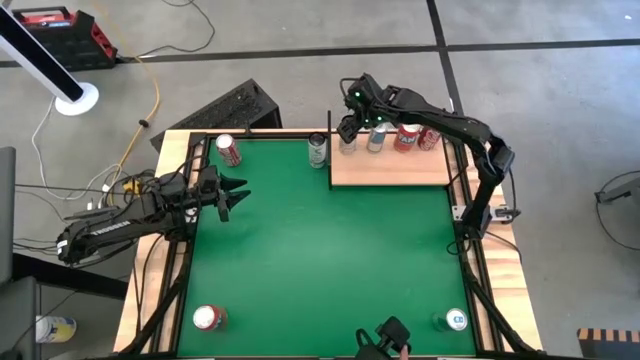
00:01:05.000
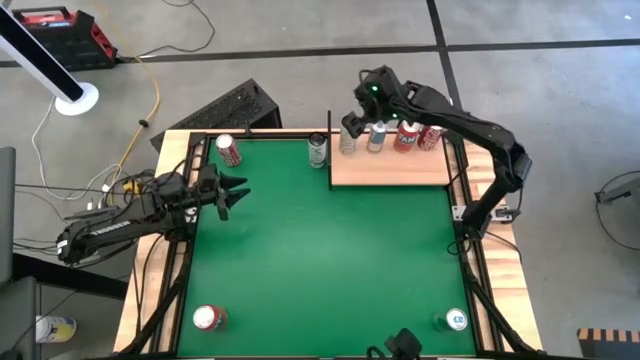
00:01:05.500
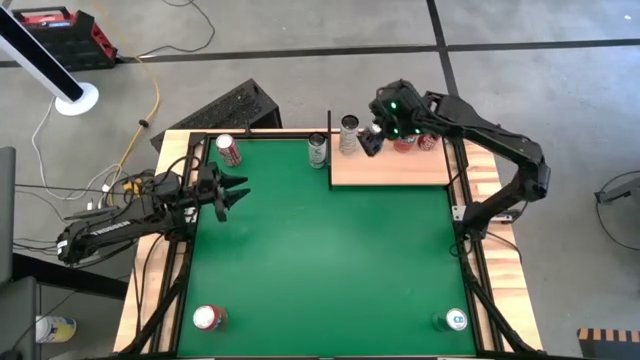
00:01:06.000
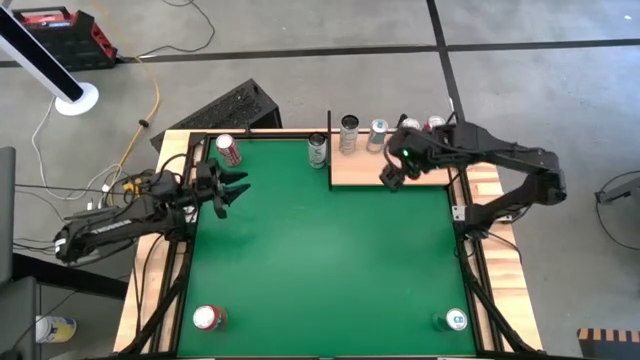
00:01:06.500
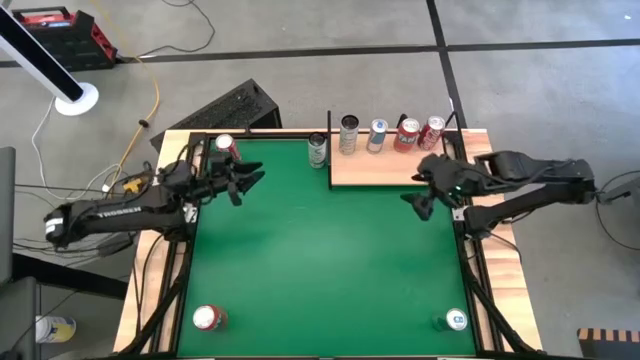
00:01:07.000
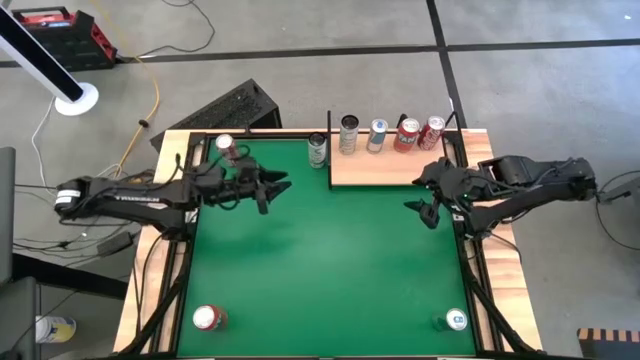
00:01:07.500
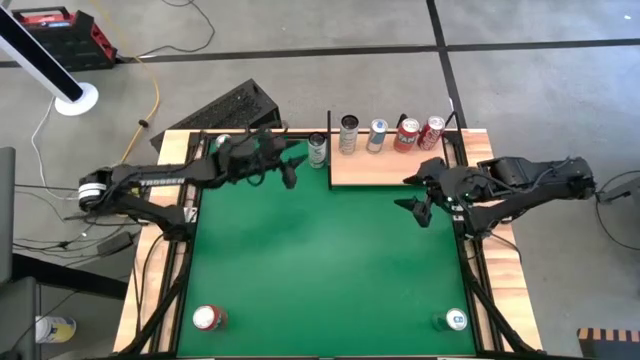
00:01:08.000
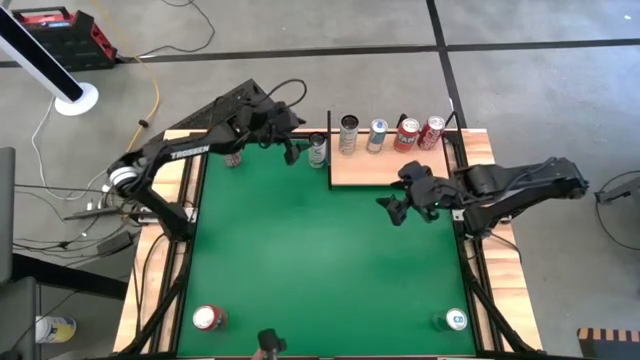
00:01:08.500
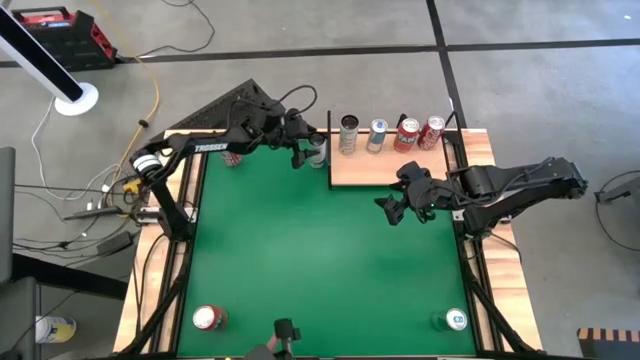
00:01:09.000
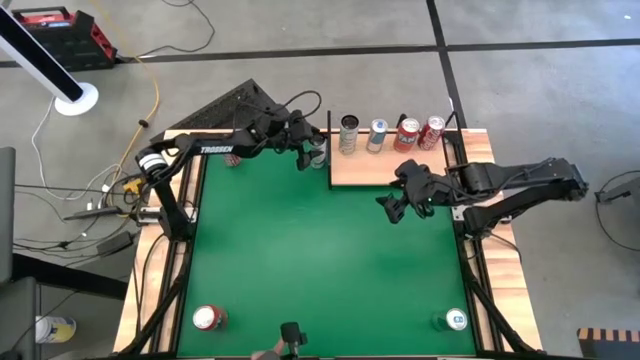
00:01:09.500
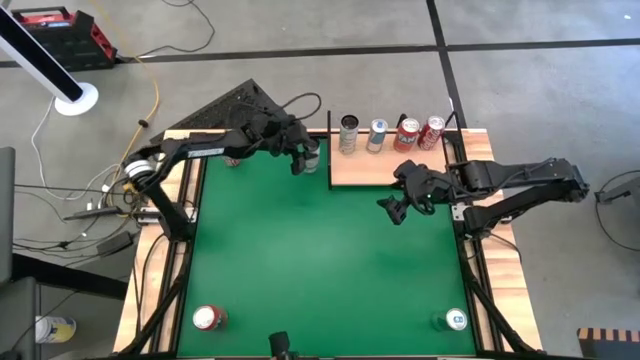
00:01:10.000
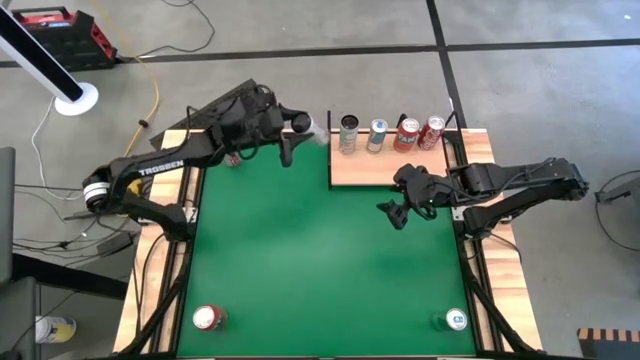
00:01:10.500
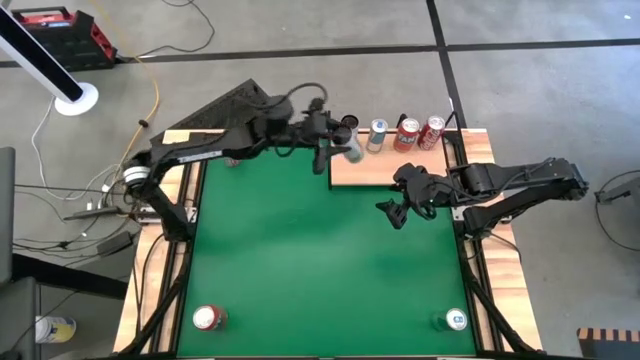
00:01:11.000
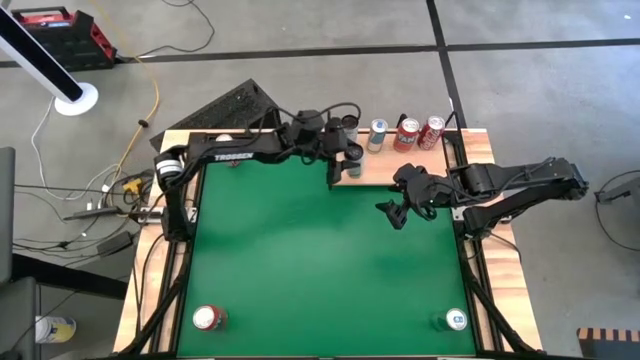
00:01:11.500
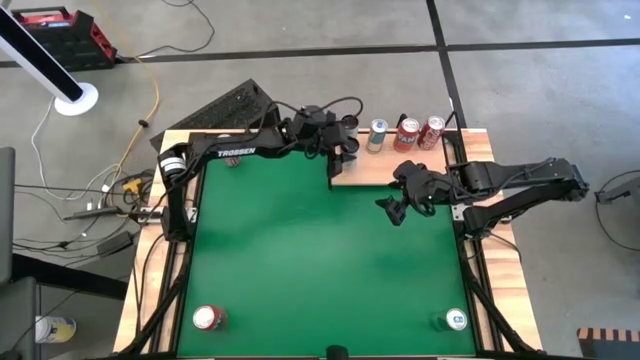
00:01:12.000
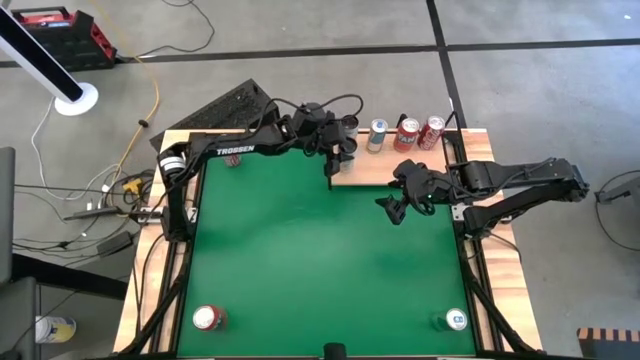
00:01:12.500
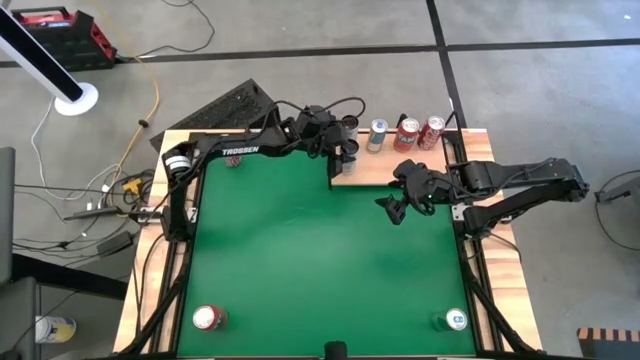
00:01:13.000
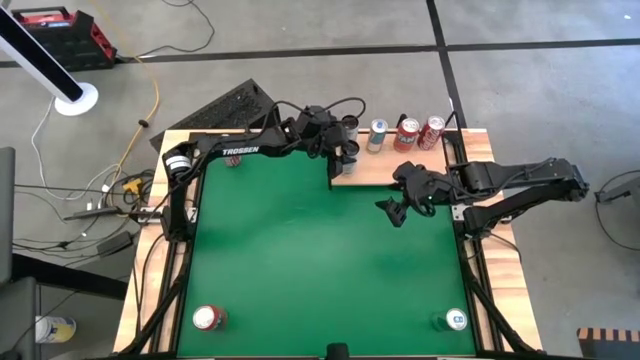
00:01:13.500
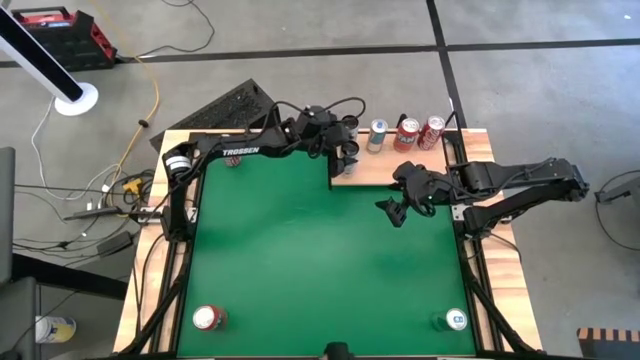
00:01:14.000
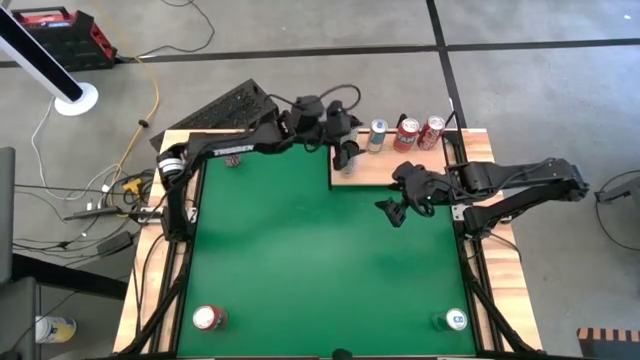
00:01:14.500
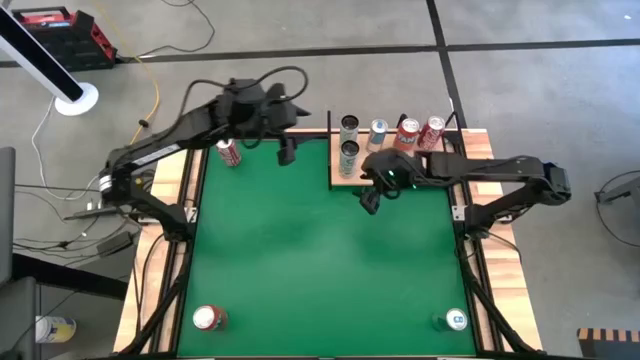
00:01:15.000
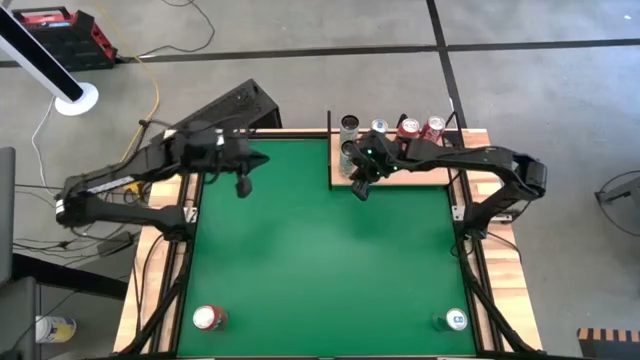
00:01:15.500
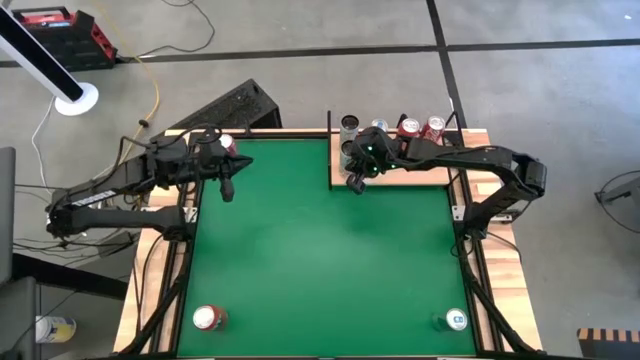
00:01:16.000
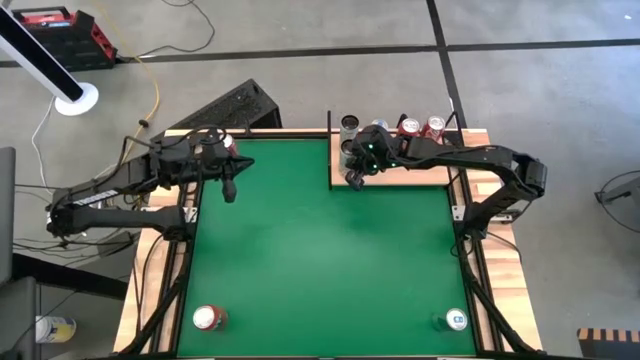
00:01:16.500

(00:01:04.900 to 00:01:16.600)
Task: Place canned beverage on shelf
Put the white yellow soda can on the shelf aligned with the other white yellow soda can

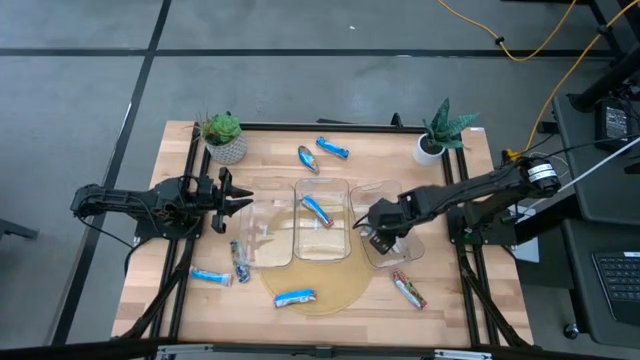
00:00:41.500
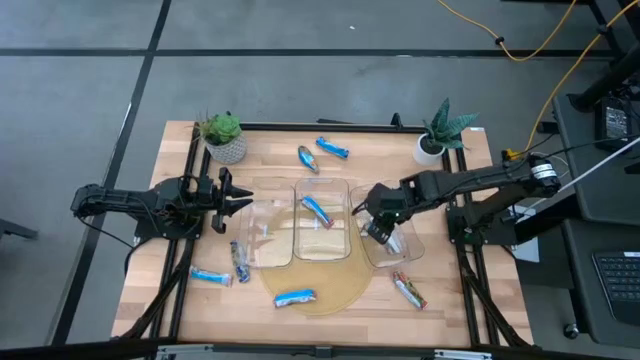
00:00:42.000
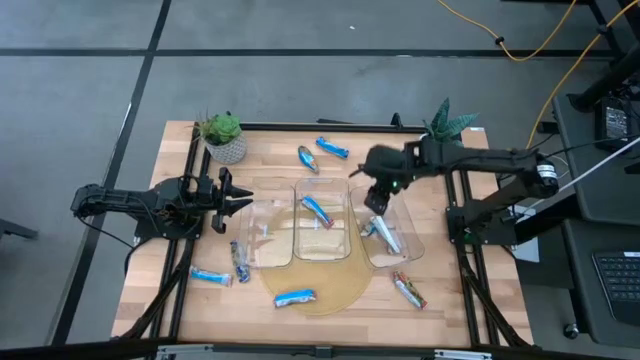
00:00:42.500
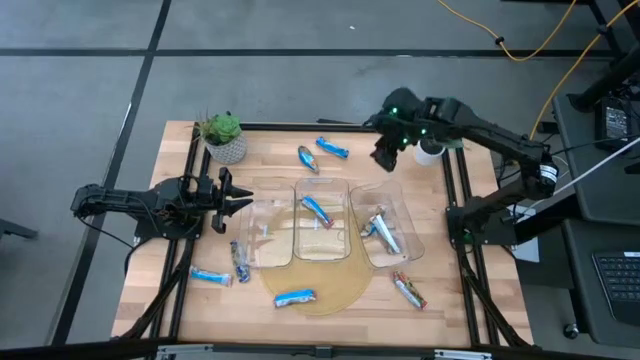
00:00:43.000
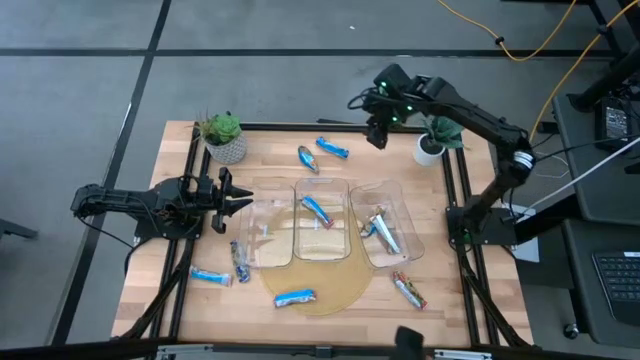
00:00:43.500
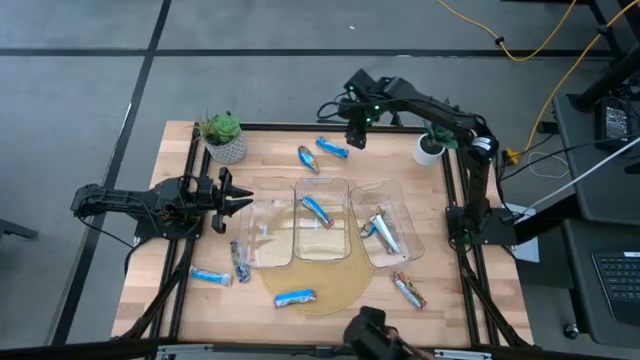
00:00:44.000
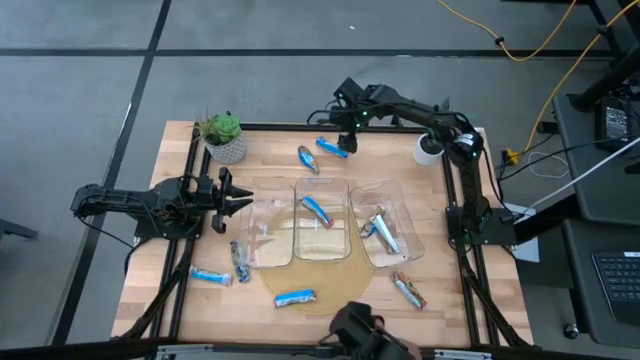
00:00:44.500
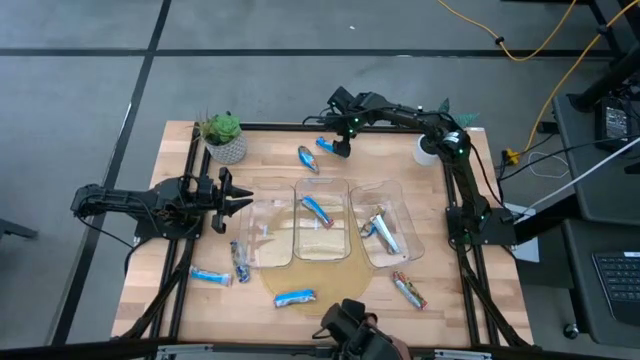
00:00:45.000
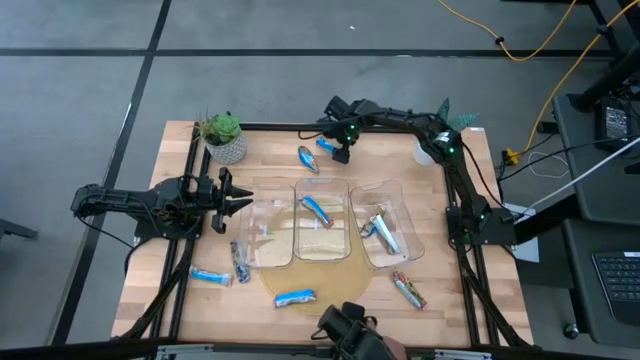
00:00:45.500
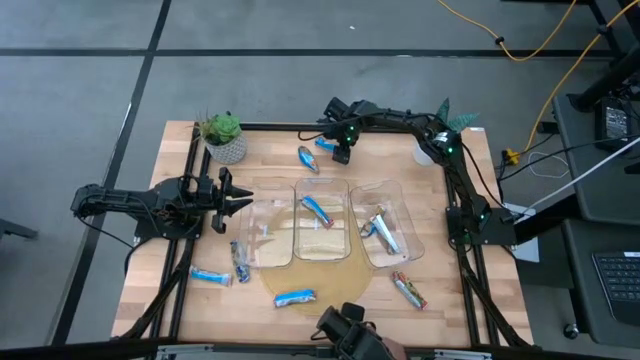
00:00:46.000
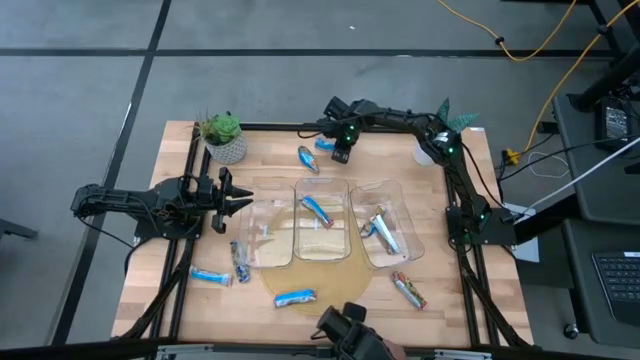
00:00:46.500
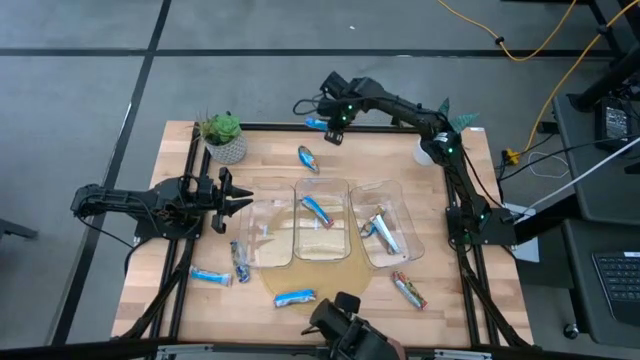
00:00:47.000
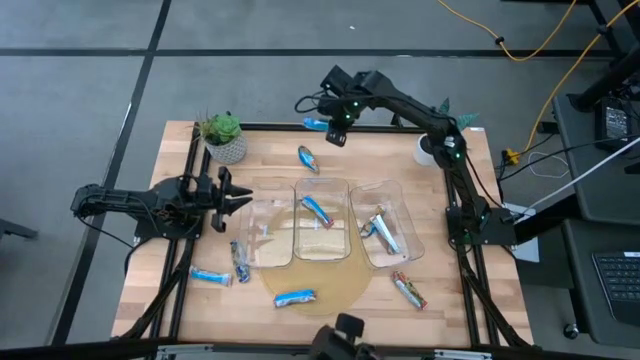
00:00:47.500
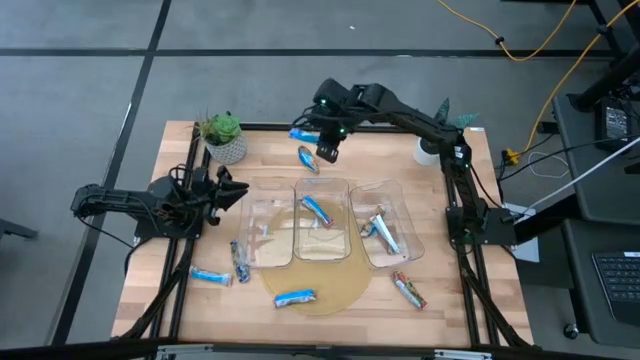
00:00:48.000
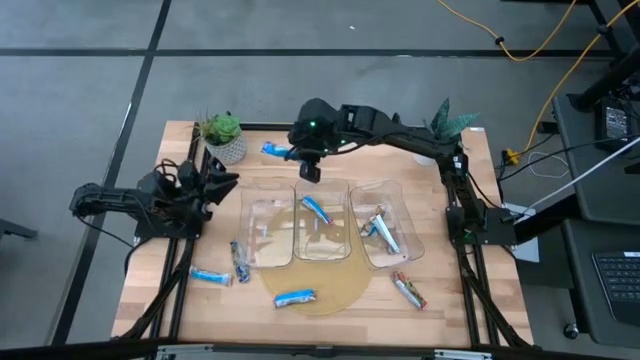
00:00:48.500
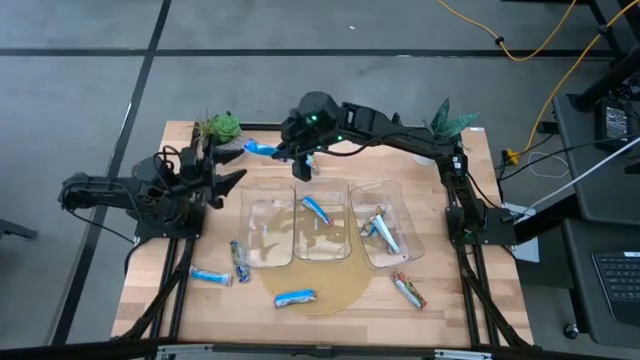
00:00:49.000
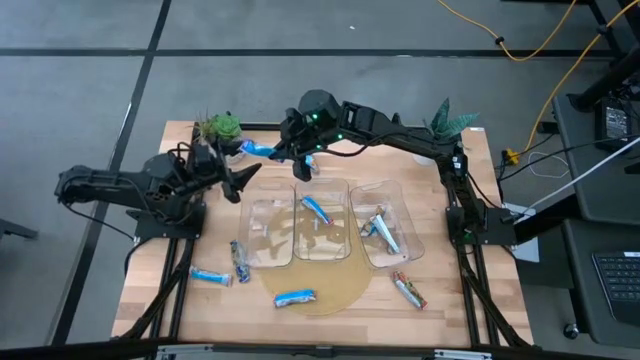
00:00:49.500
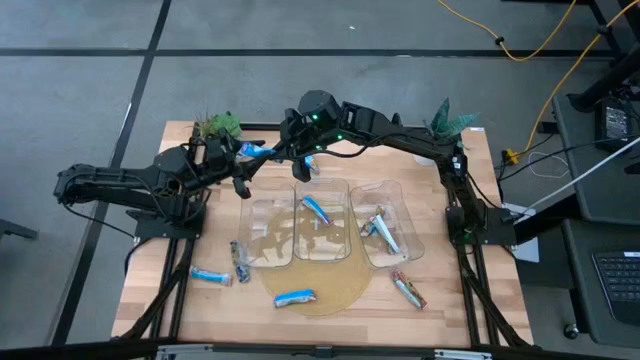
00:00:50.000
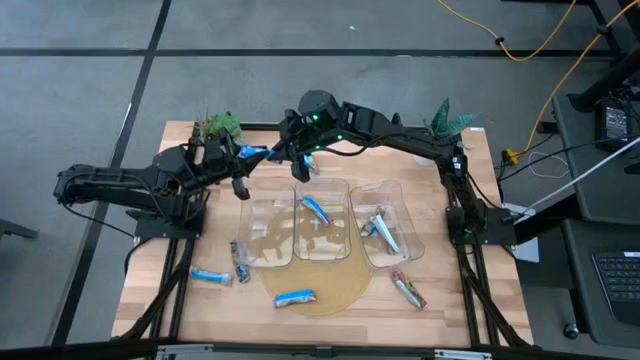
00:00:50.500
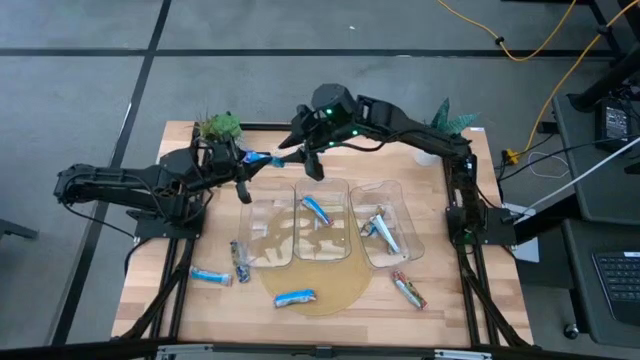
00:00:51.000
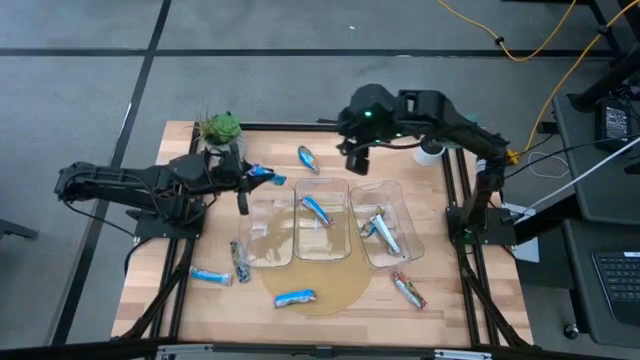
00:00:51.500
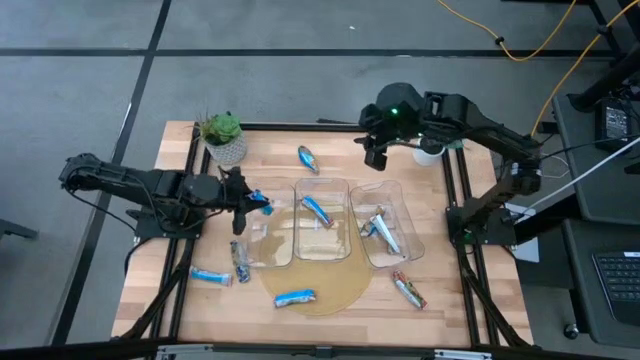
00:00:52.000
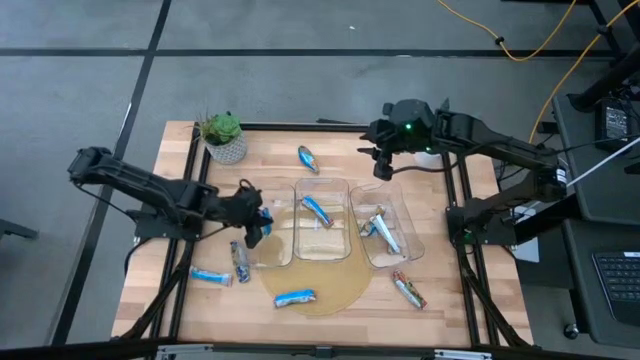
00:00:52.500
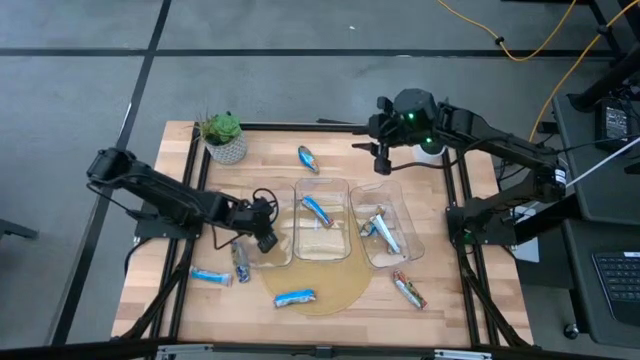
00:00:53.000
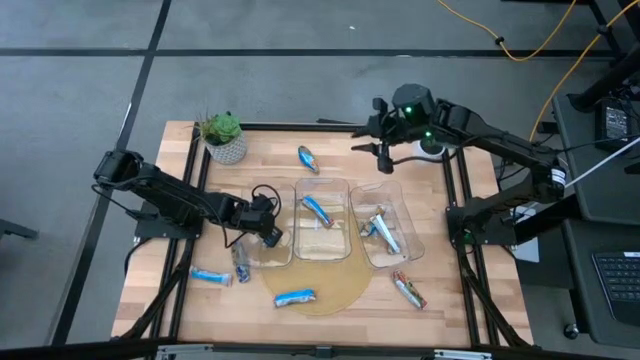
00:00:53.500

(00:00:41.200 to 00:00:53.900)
Task: Pick and place Granola Bars by type
Put the blue granola bar into the left transparent bin
